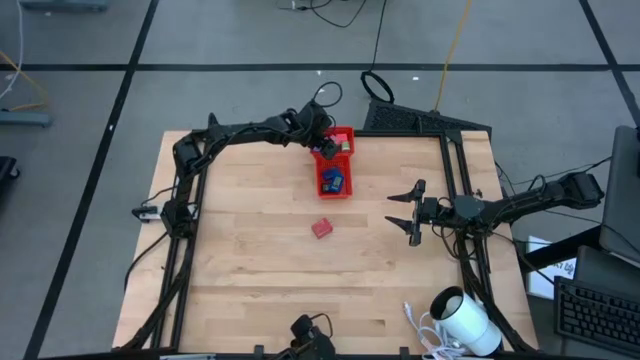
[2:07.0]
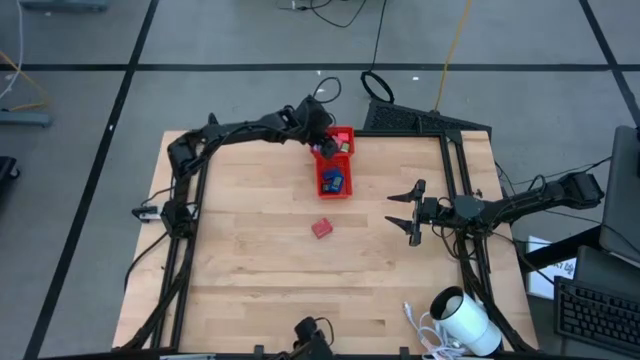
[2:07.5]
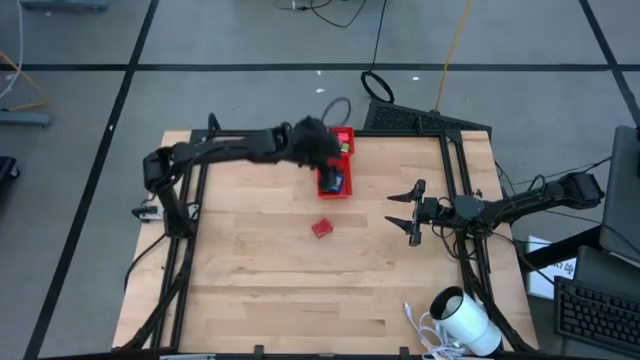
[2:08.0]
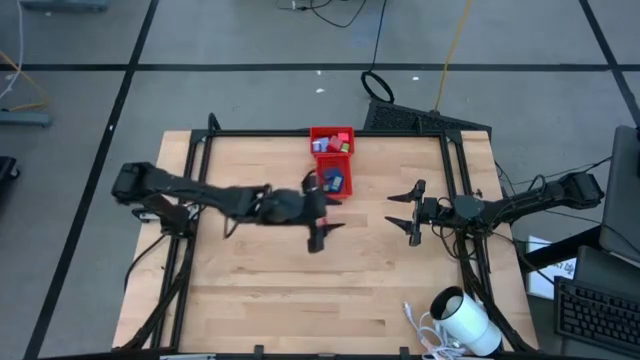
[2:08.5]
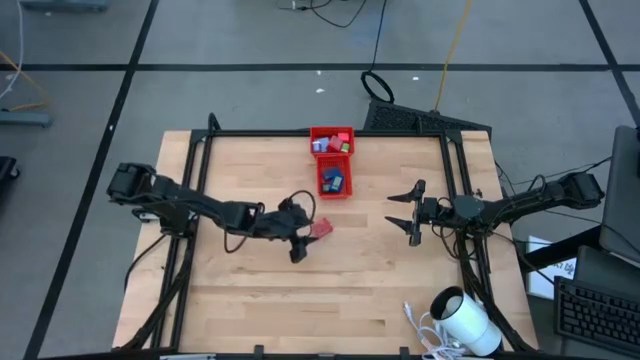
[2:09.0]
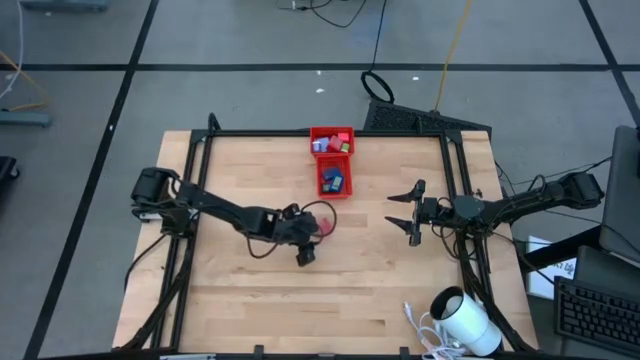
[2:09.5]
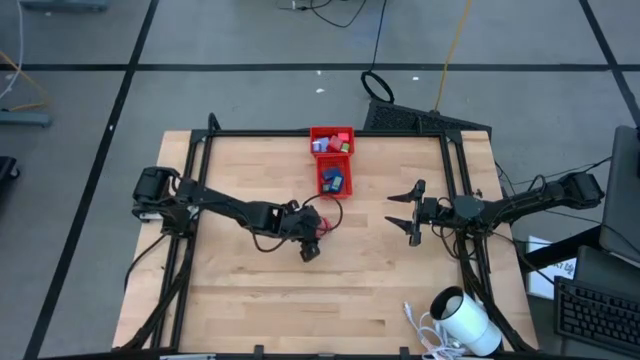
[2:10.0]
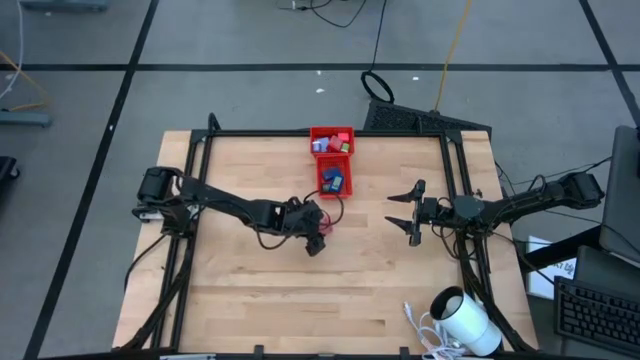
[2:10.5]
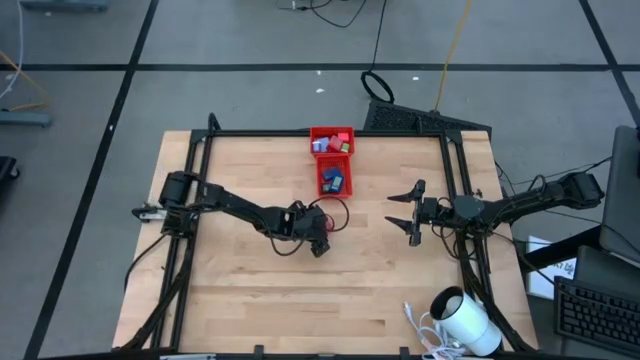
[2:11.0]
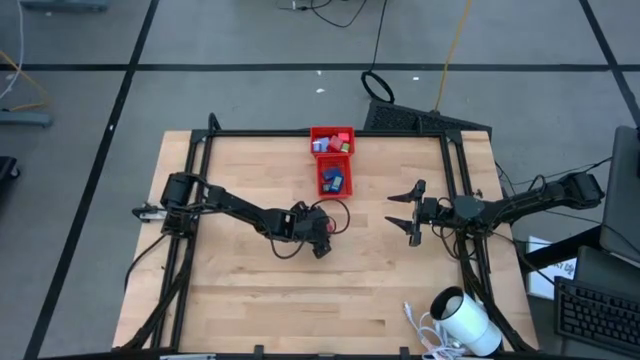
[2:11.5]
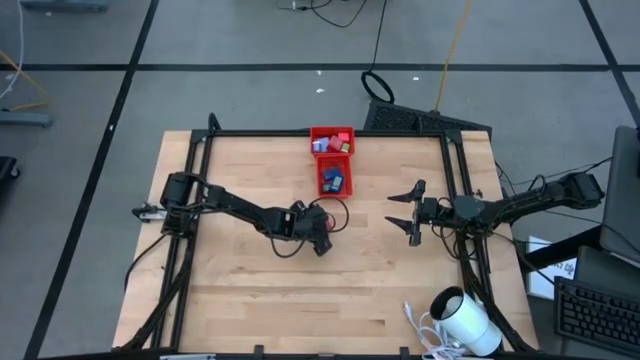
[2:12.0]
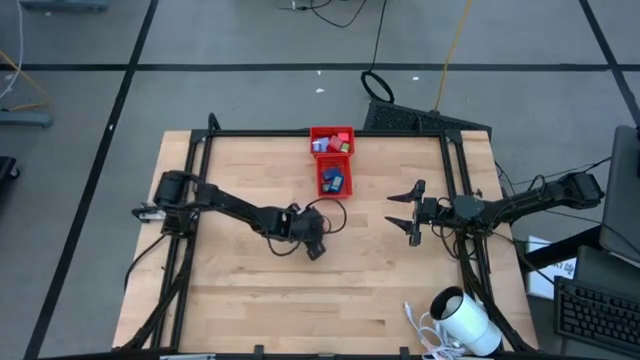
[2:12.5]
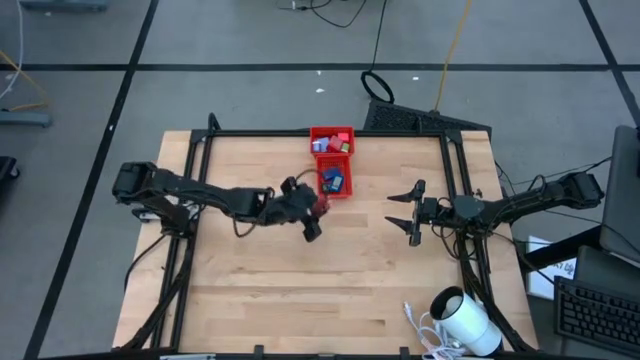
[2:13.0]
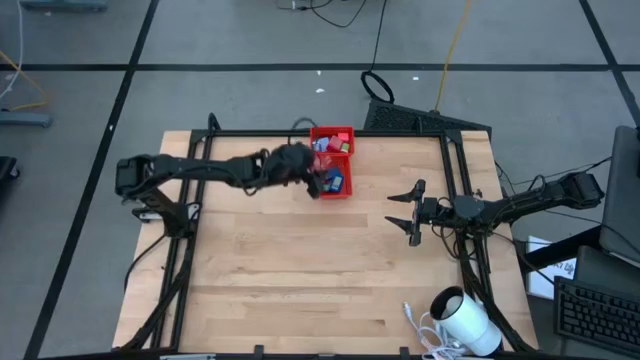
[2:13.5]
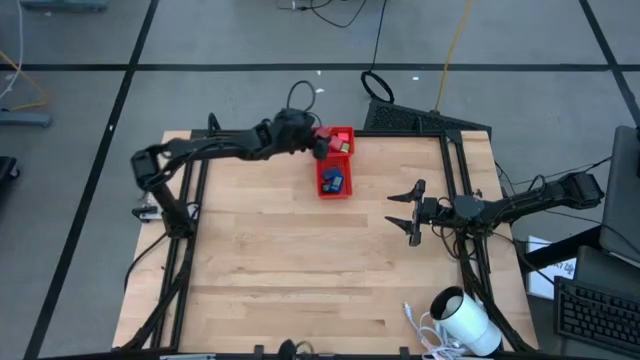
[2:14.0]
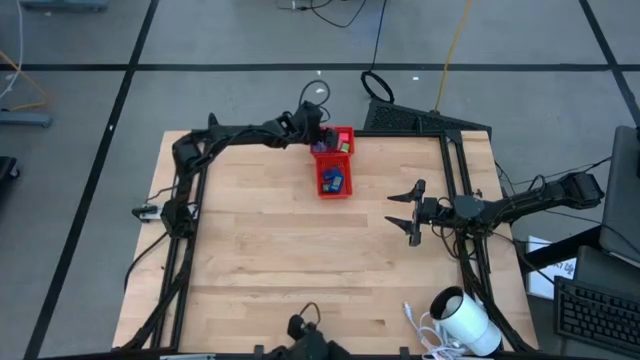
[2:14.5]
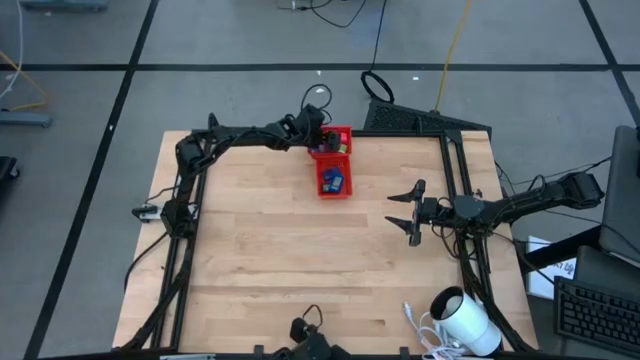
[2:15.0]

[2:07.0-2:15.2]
Task: Pick & Place Office items
Put the red charger adapter into the top red bin

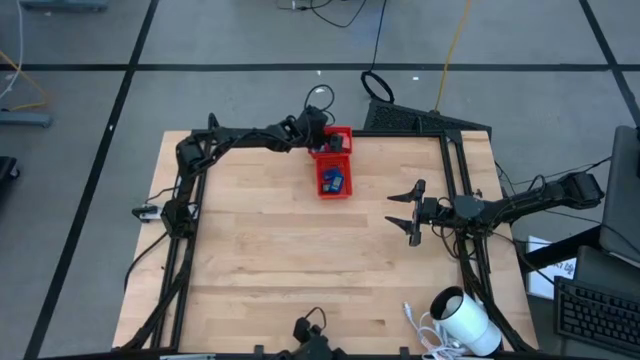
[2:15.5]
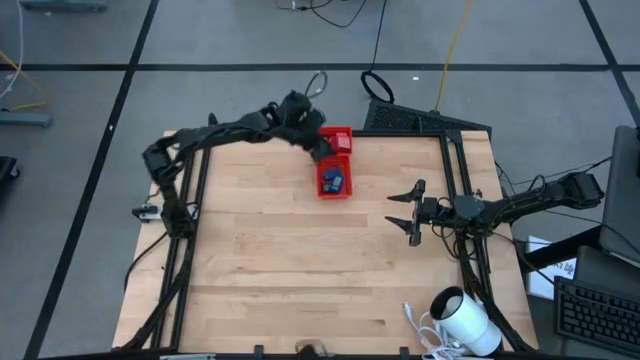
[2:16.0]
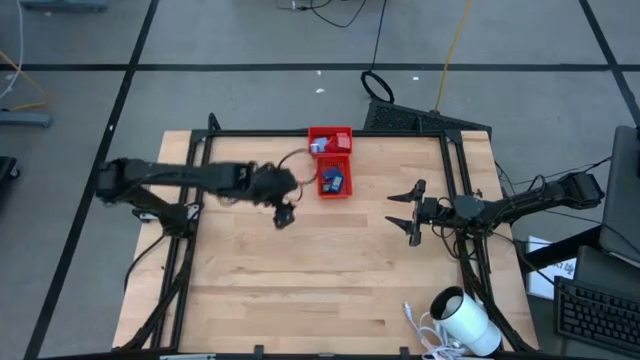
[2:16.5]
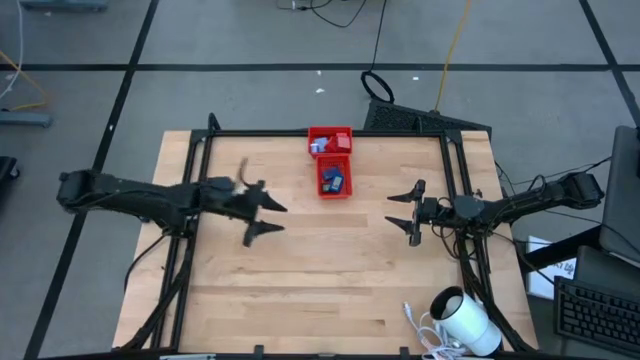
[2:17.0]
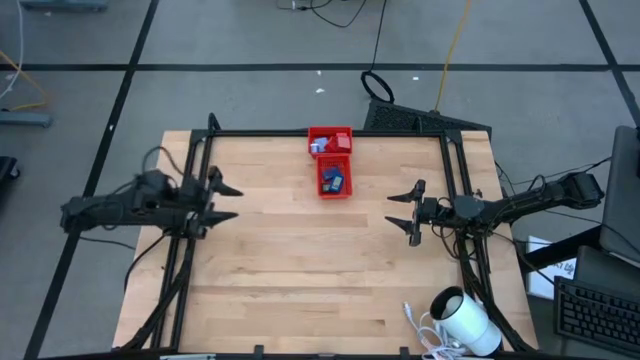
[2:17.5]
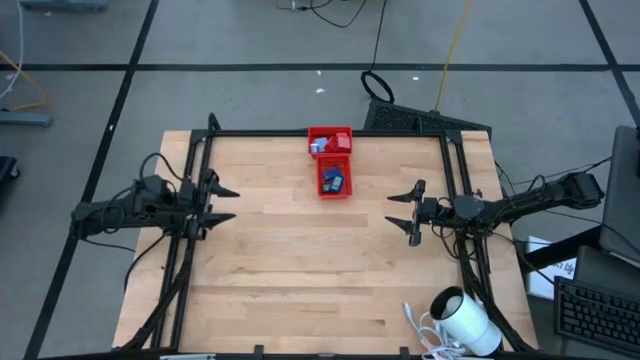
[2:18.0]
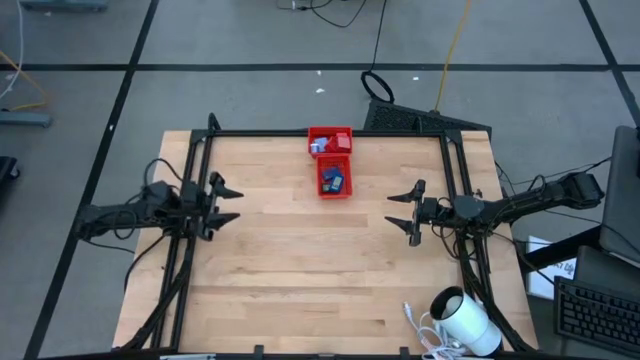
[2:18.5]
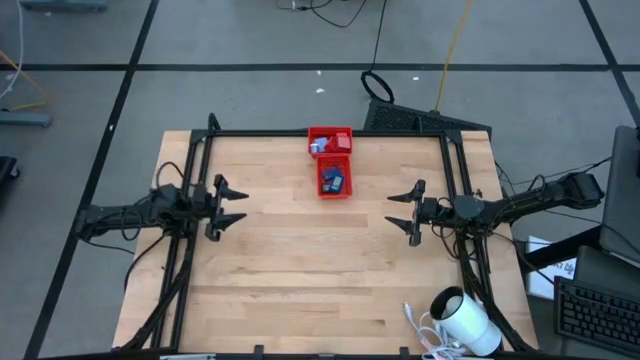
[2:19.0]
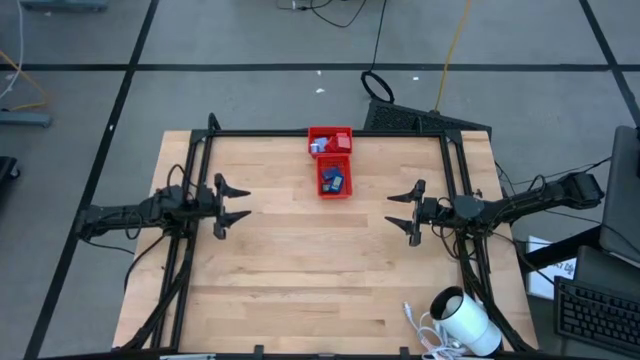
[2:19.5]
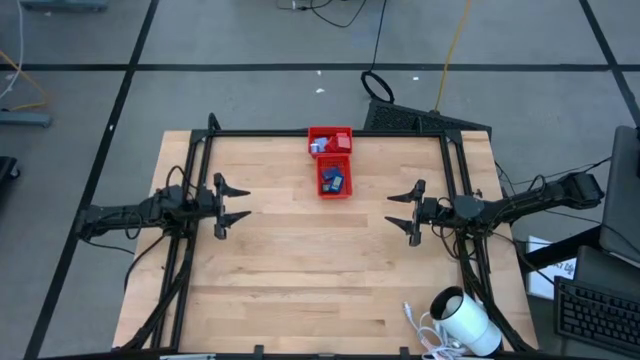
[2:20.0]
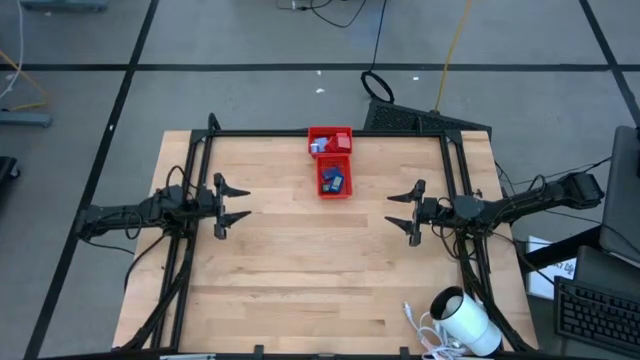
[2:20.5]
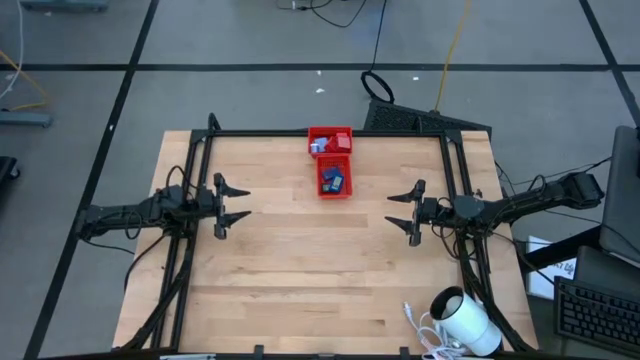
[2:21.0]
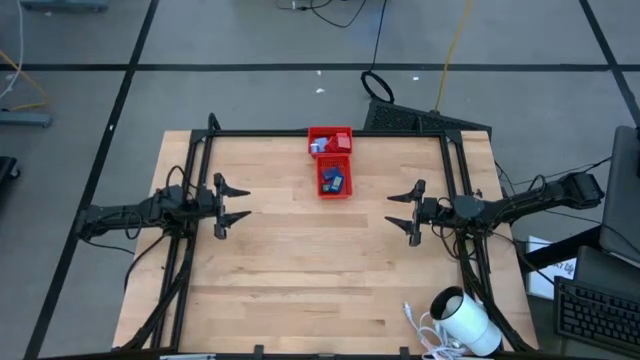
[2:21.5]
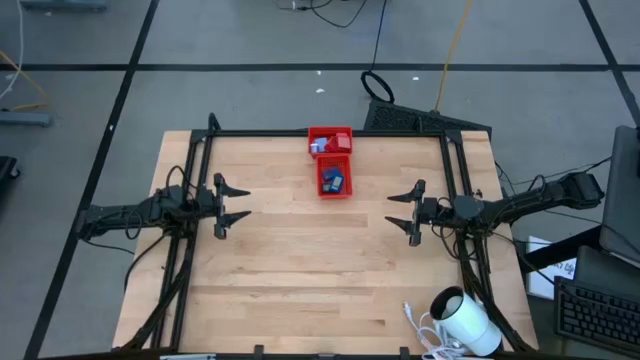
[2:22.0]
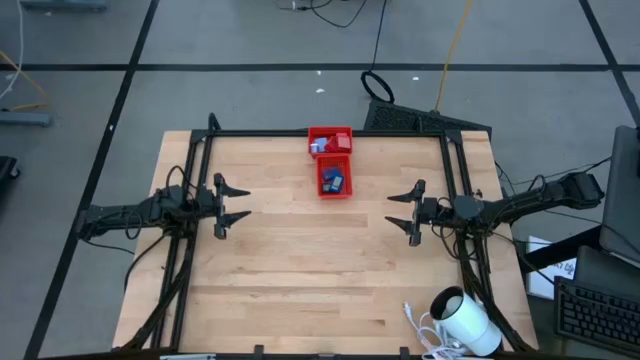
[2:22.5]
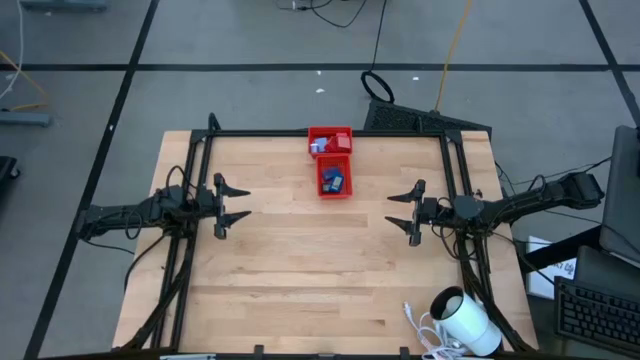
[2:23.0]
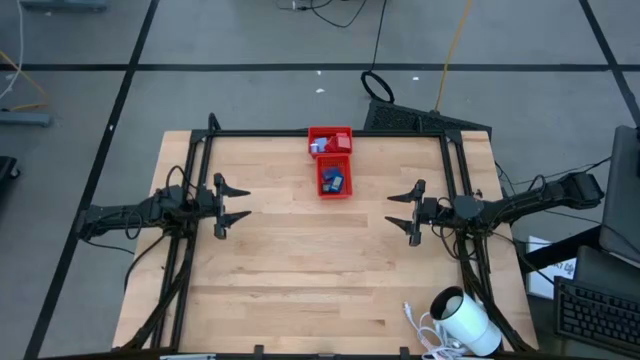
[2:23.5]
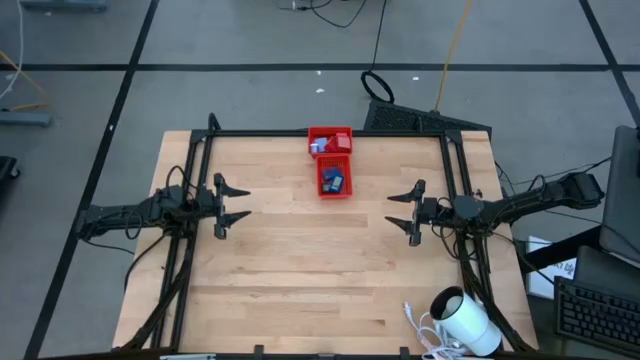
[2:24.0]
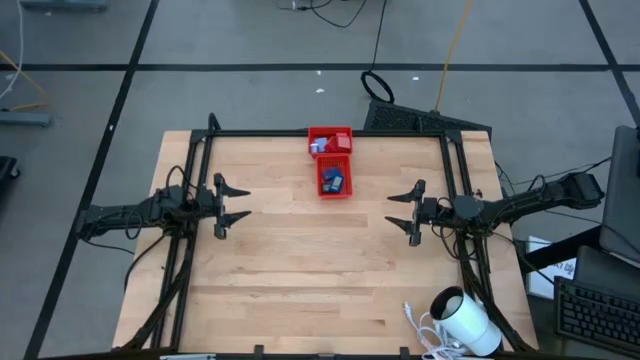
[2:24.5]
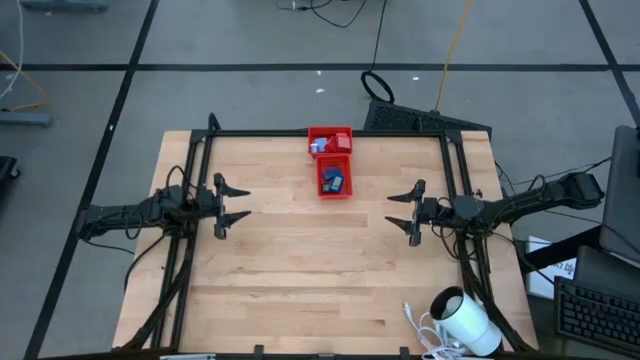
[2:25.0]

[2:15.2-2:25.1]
Return to Home Position

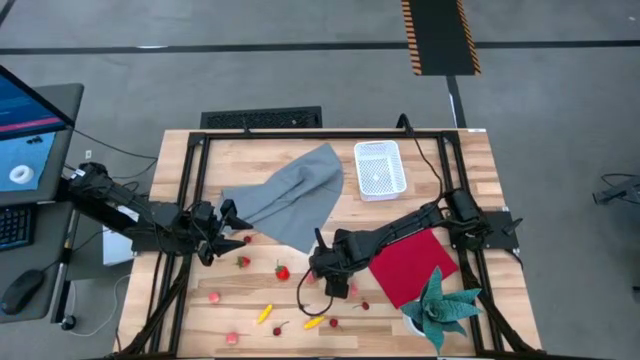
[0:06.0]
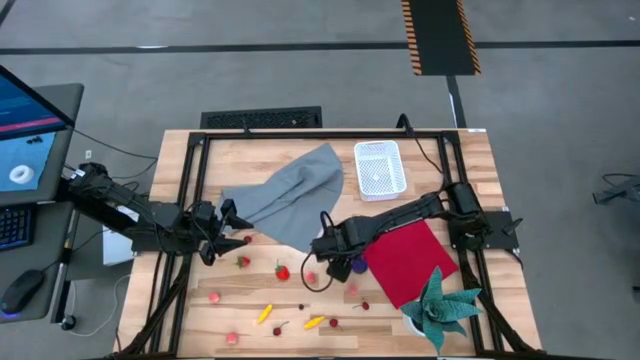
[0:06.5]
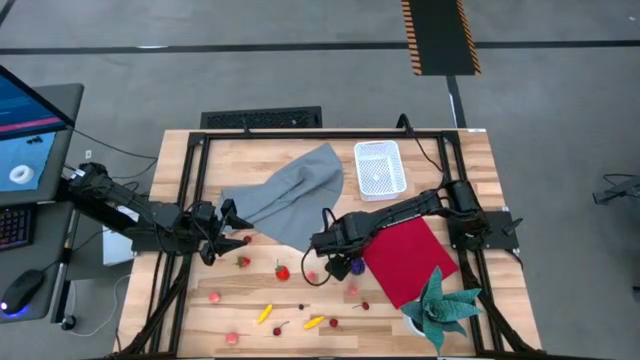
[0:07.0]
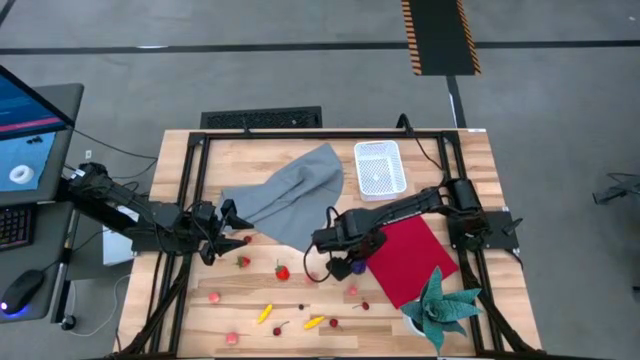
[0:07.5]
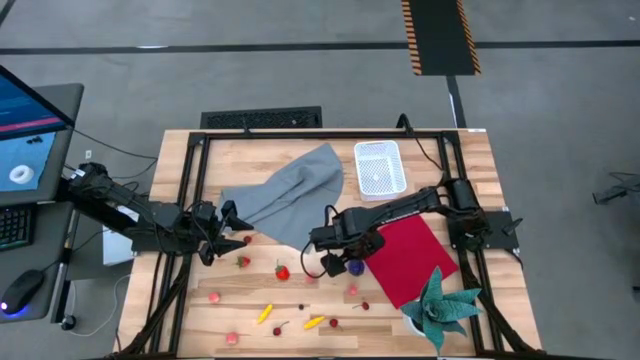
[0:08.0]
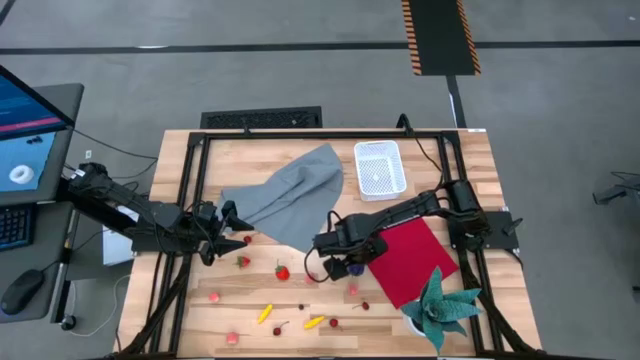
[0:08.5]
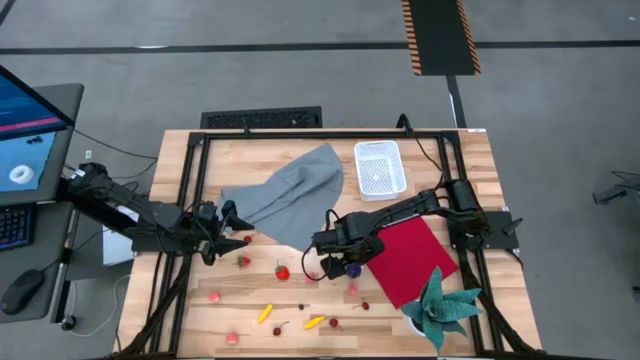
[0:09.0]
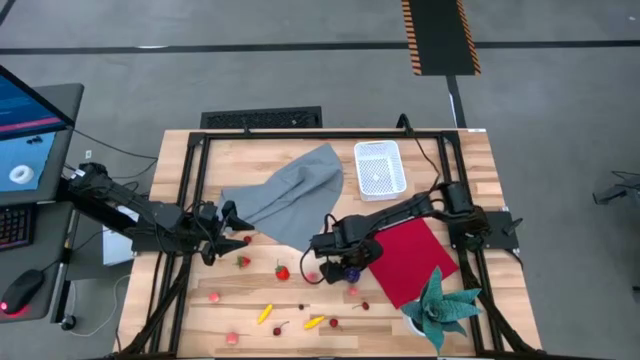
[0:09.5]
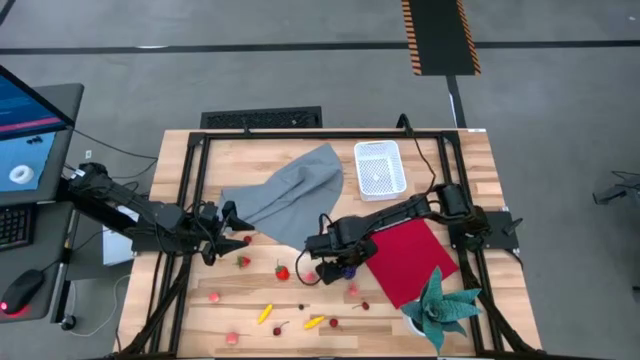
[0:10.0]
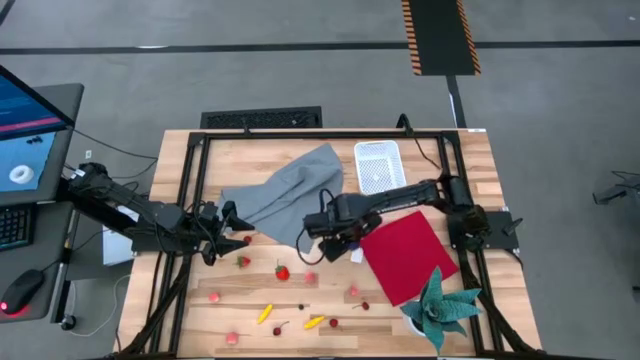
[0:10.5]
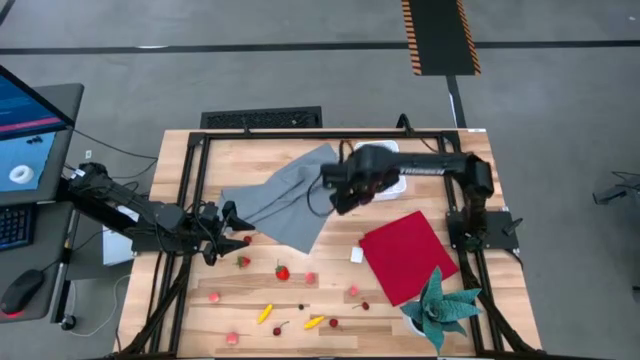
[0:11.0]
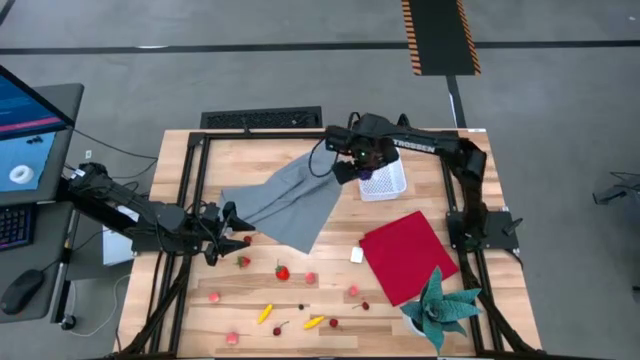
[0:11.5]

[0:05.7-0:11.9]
Task: Pick and placing Produce into tupperware
Put the purple grape into the white bin
